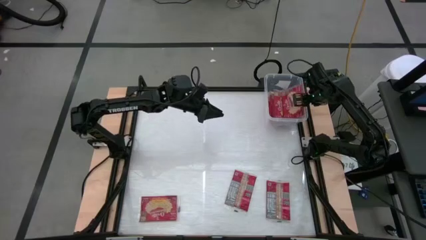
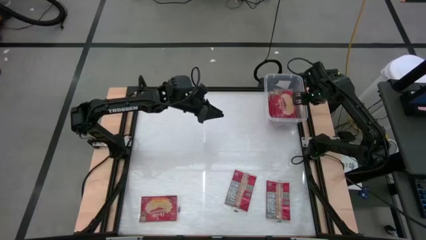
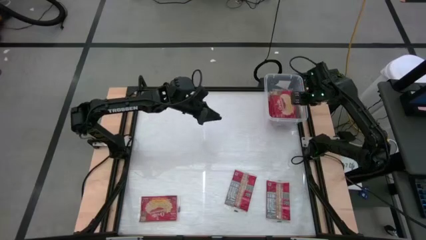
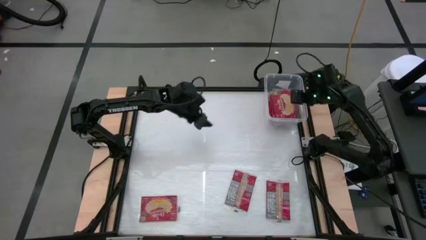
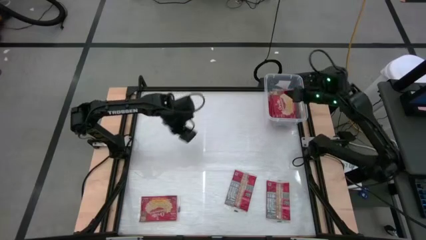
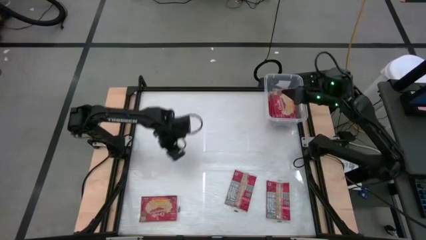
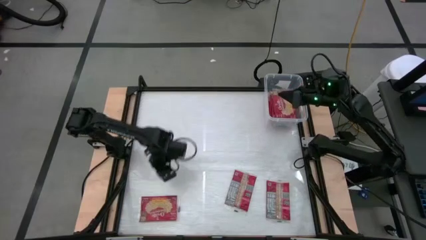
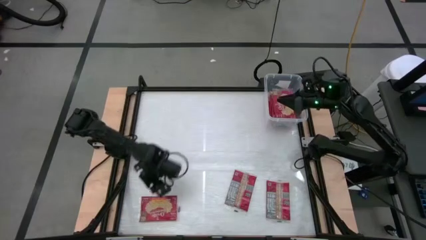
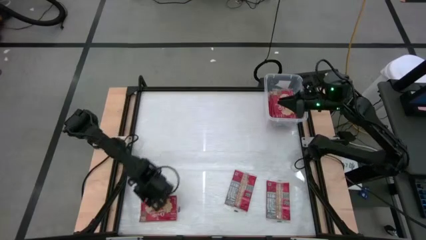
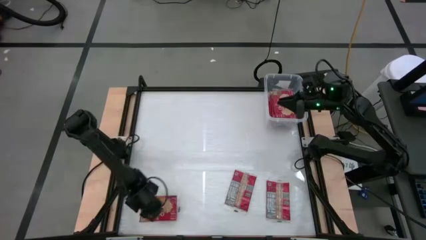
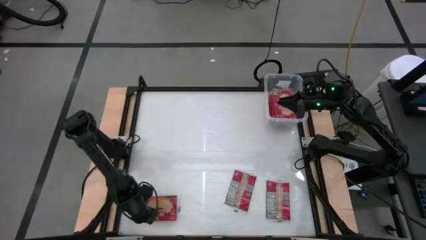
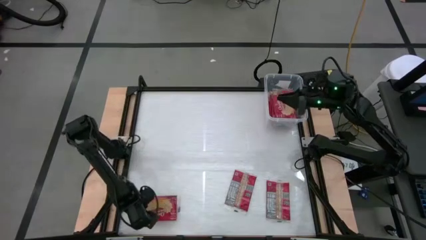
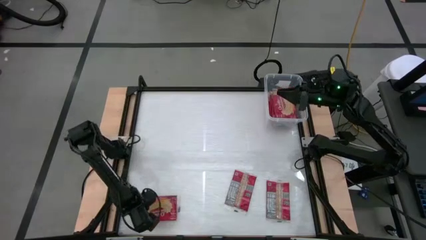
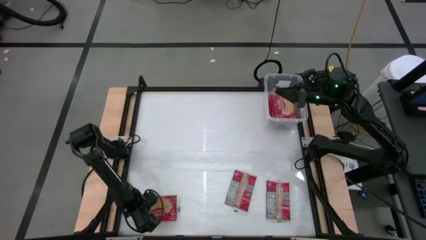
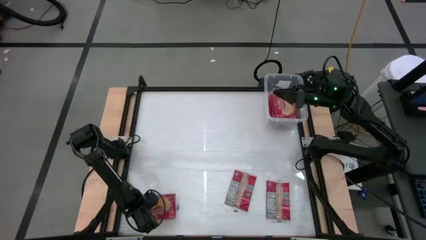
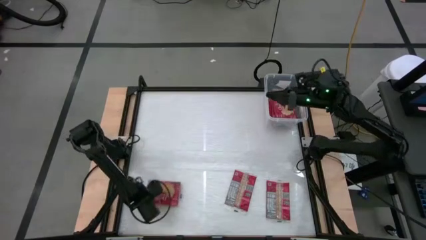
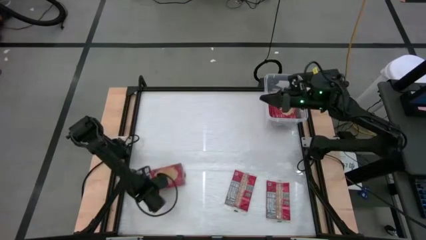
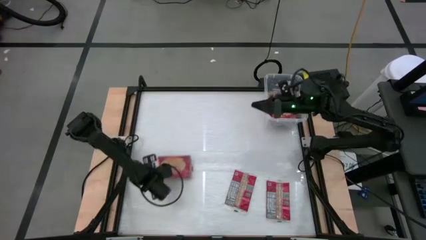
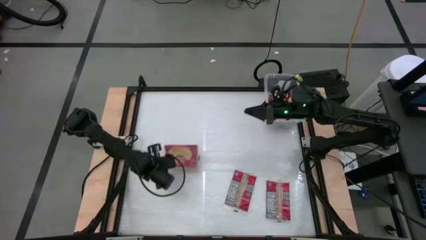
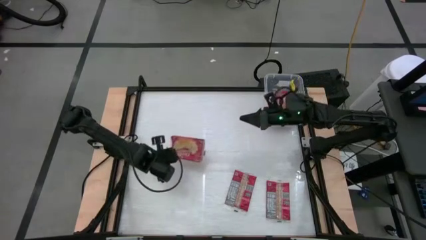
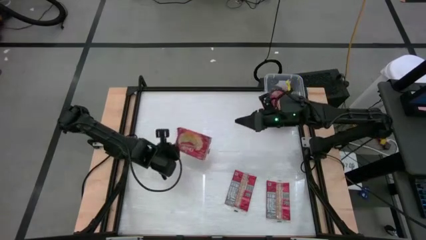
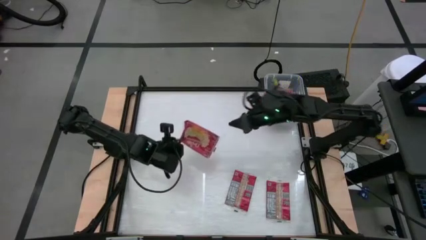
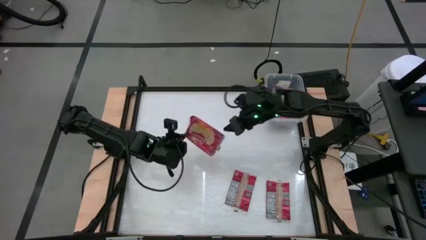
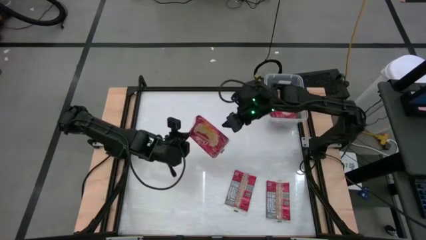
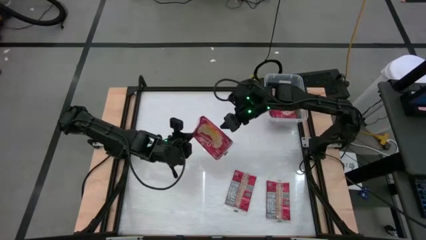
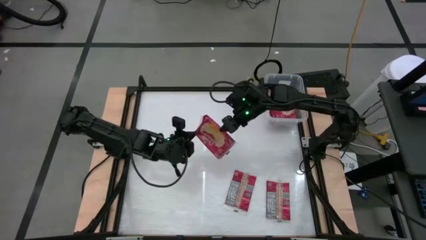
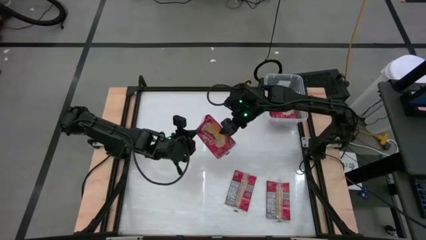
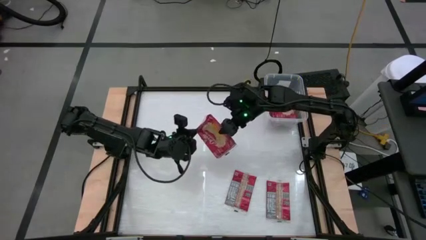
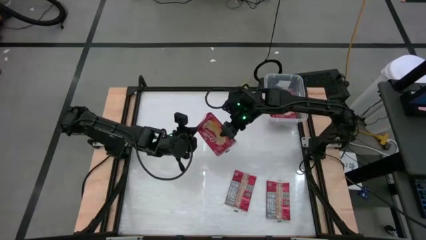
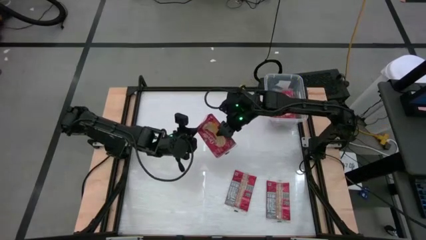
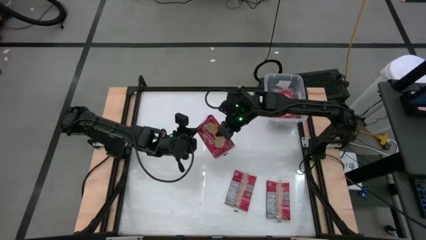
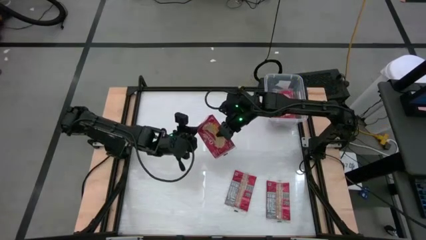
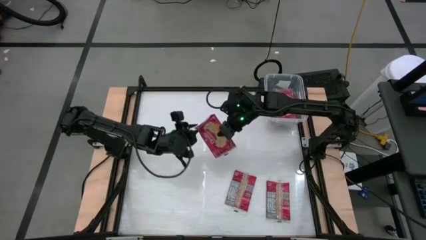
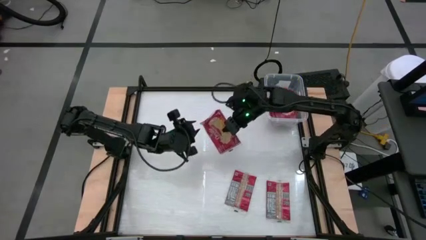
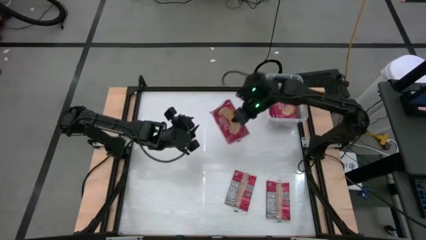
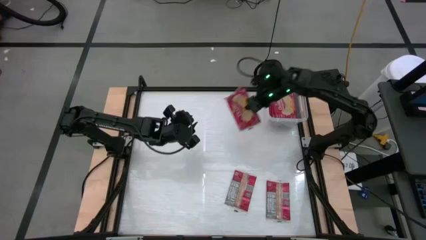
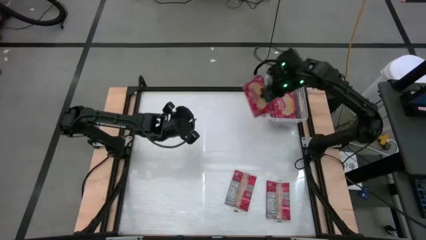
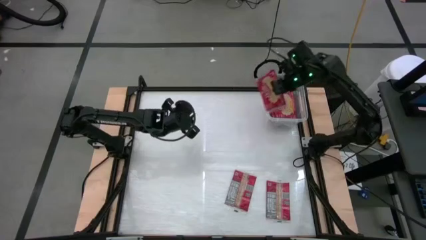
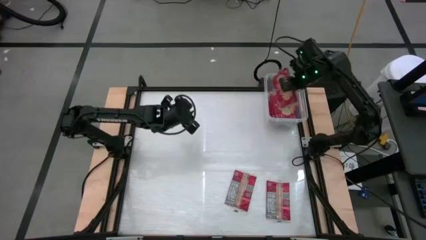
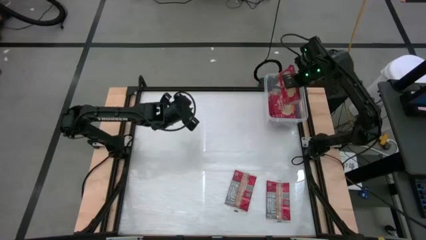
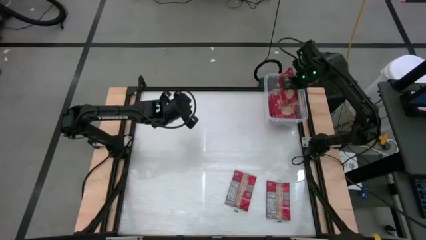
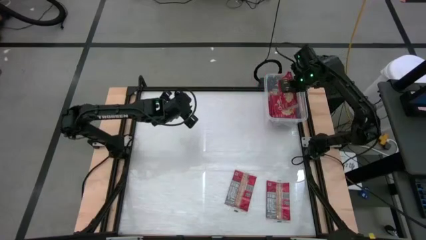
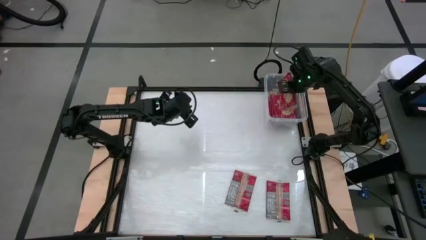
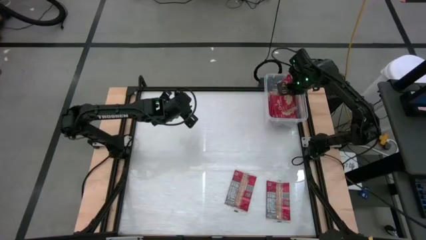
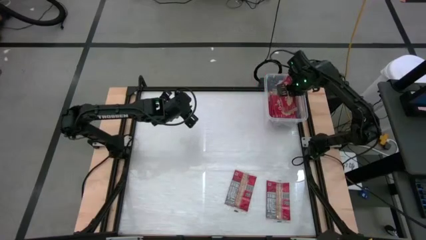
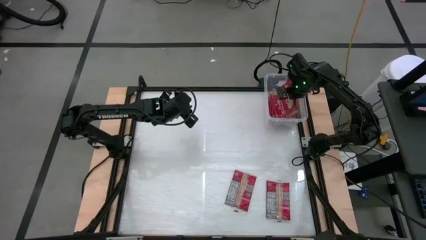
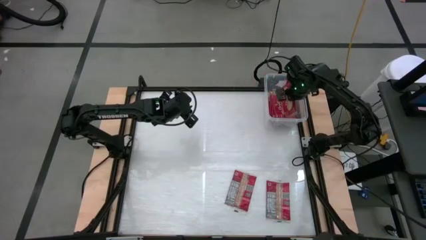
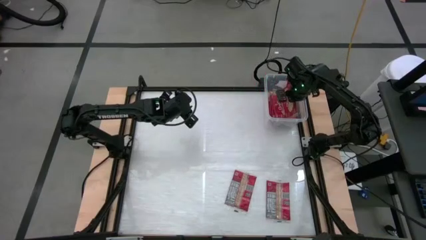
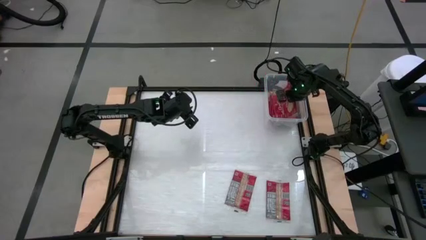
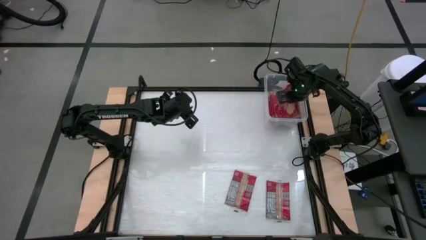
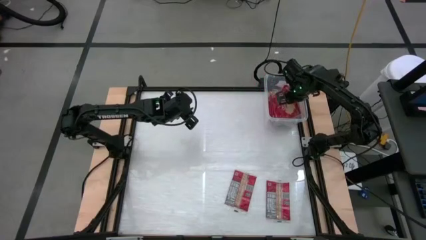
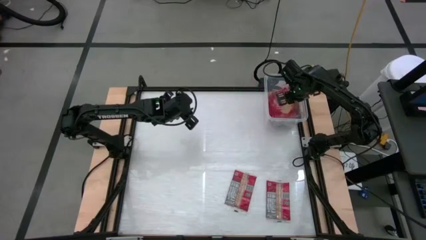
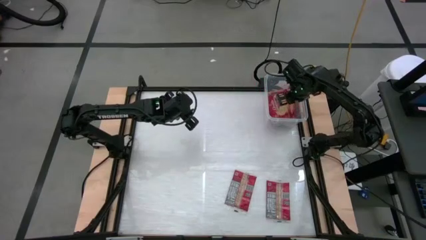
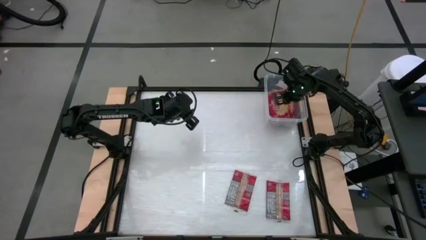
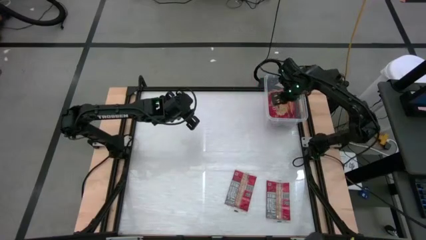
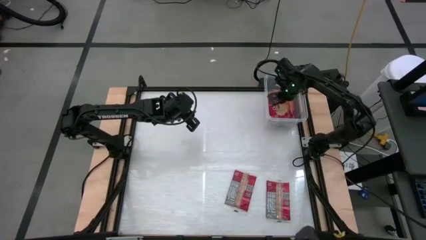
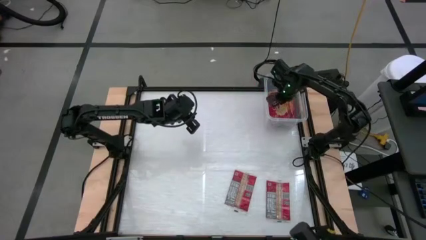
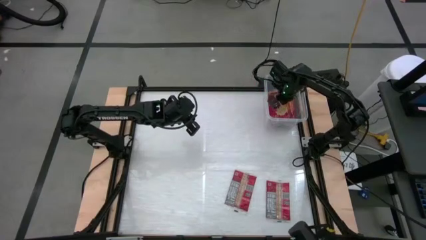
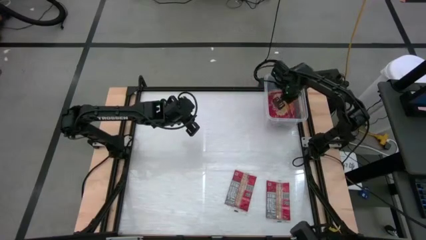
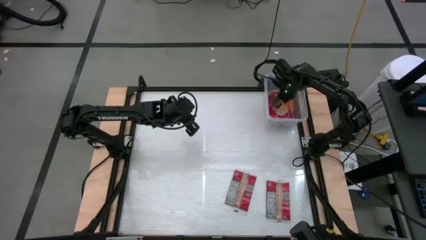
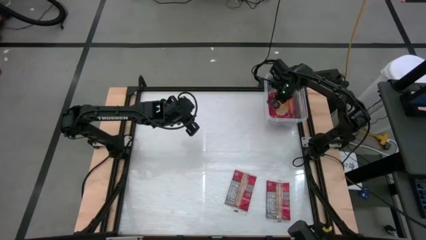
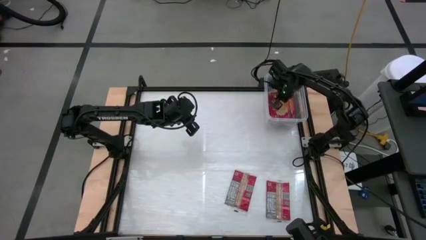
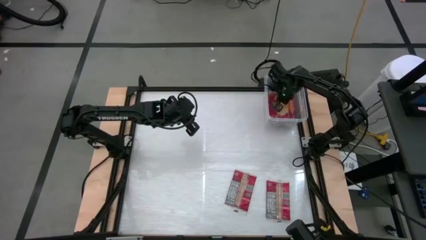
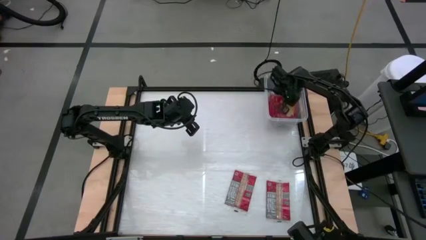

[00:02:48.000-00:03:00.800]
Task: Sort popcorn bags into baskets
Put the red popcorn bag into the transparent container

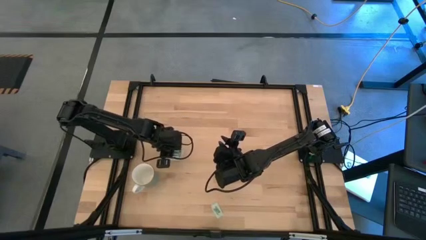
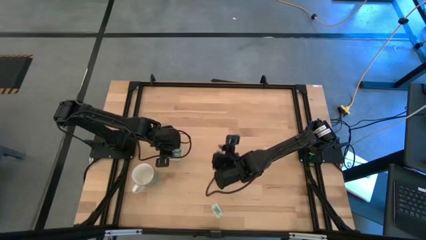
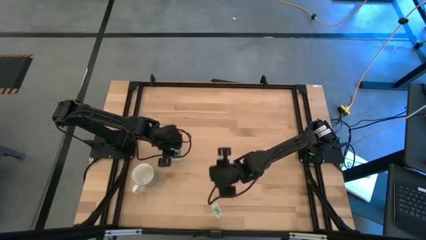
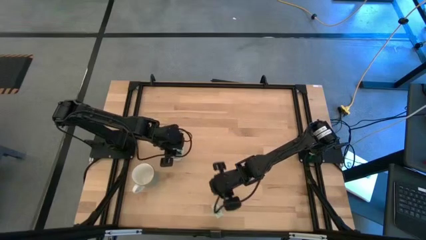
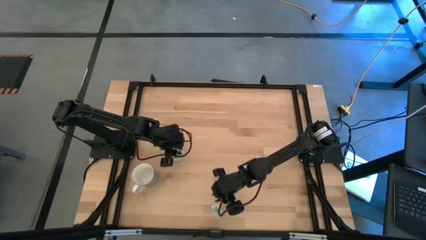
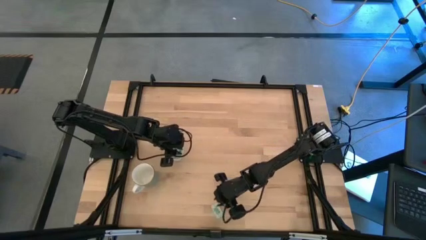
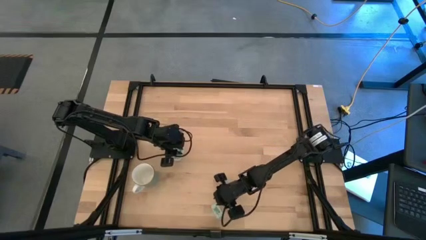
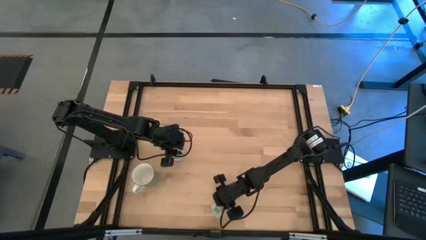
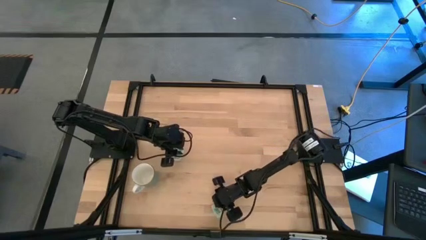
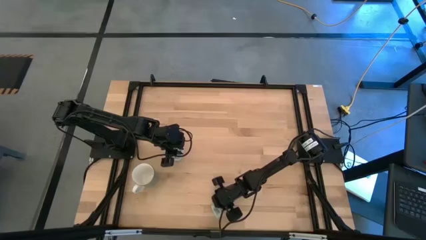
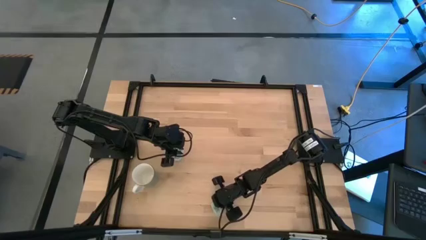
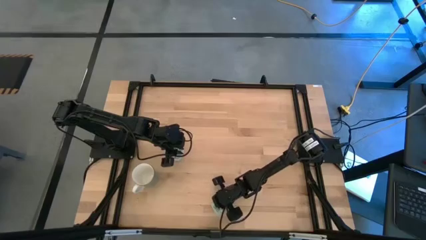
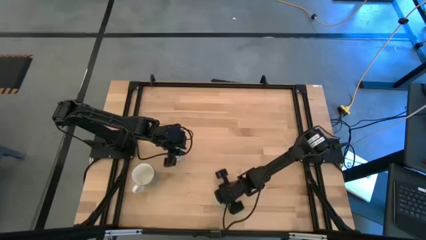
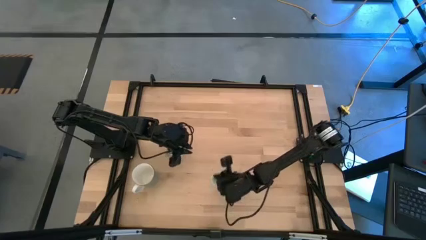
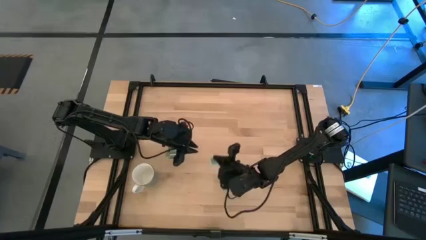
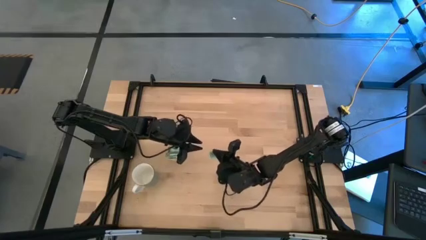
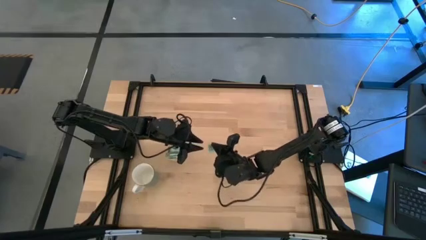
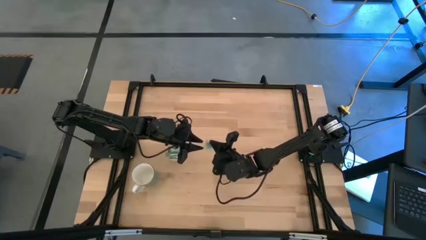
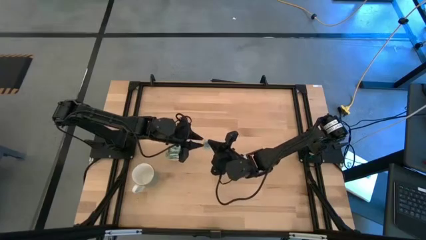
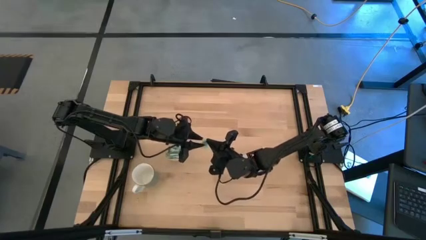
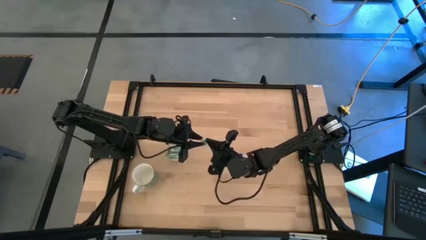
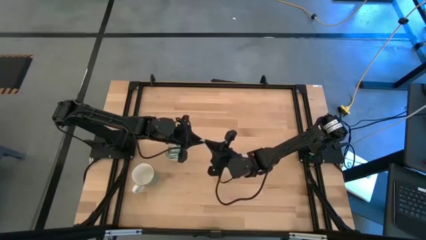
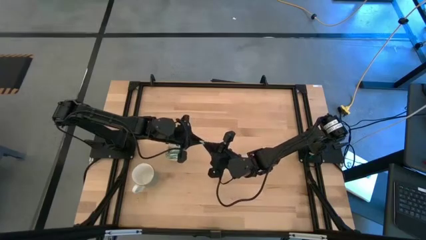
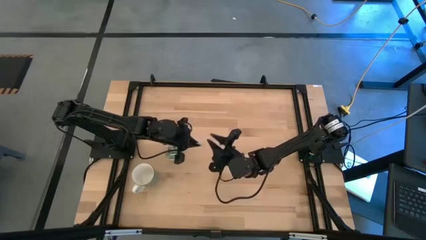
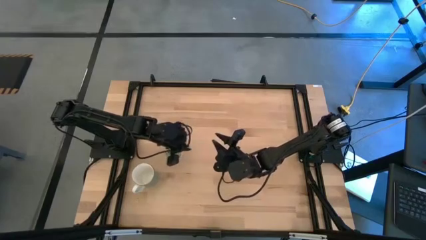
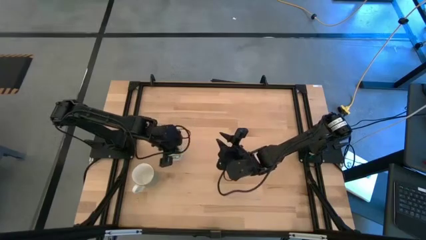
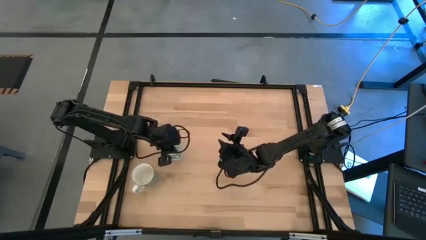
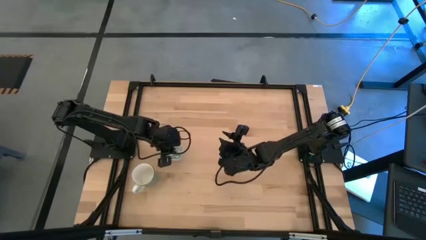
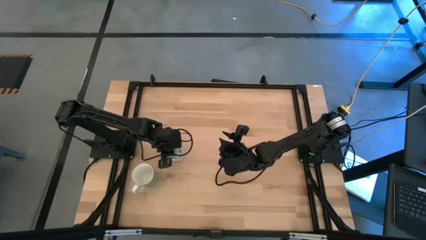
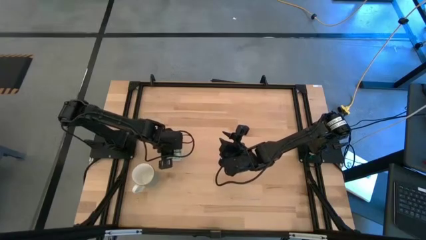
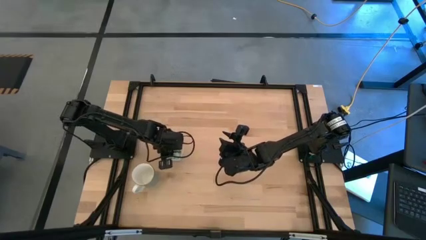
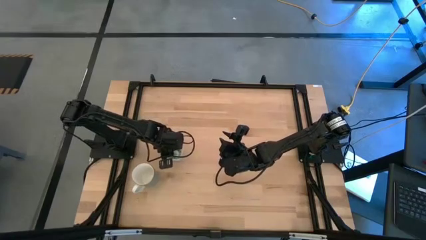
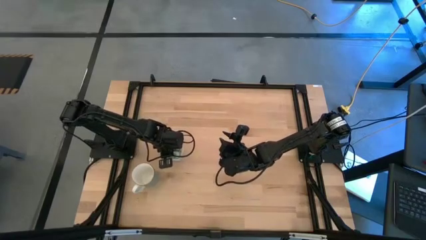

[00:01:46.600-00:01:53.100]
Task: Pick and place Stevia / Truvia into bins
Put the green stevia packet into the transparent container
